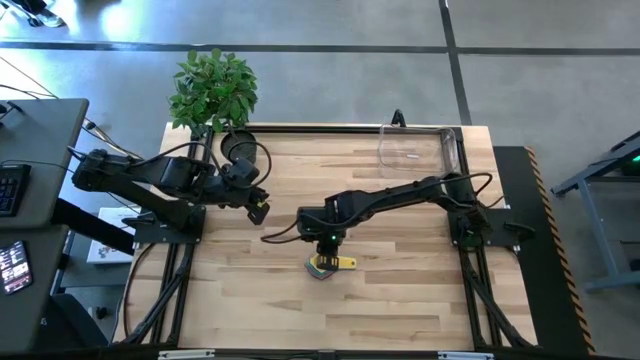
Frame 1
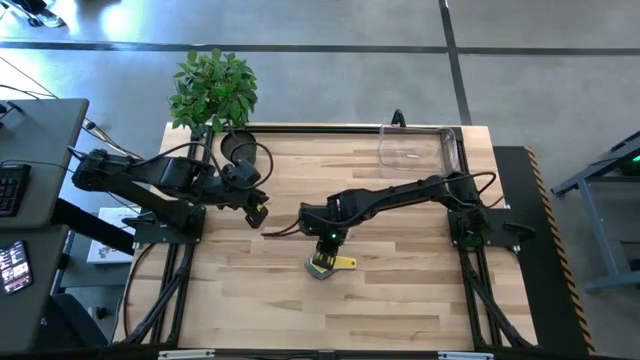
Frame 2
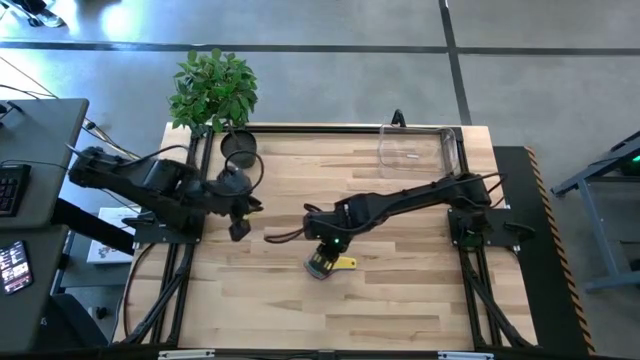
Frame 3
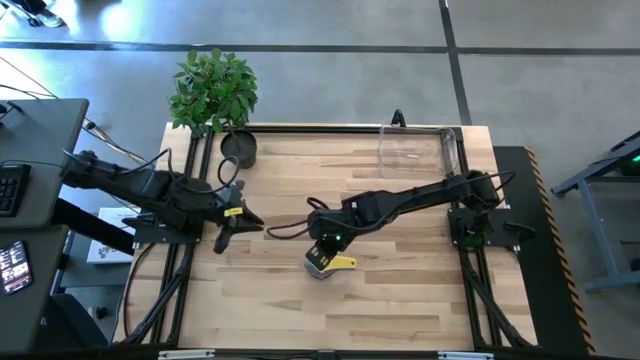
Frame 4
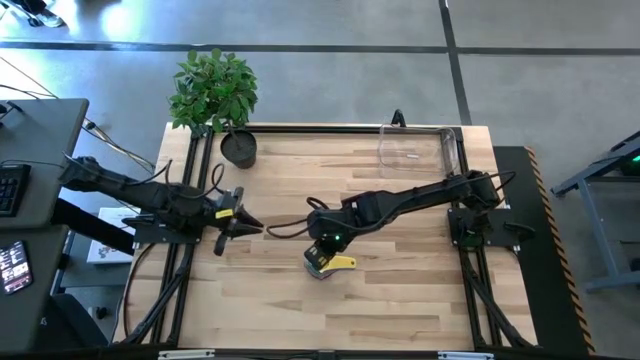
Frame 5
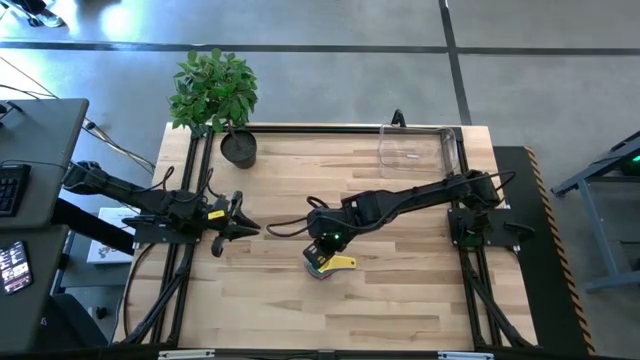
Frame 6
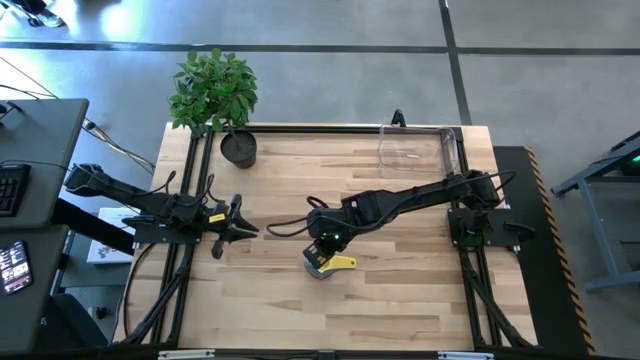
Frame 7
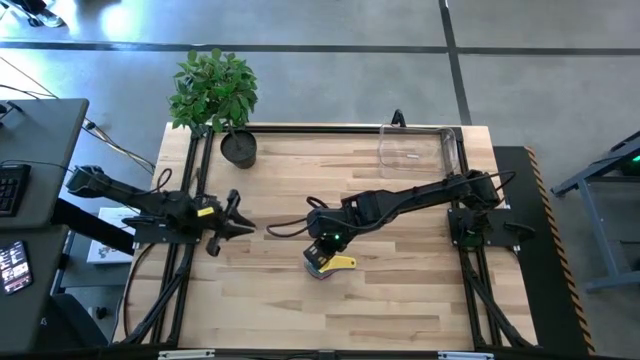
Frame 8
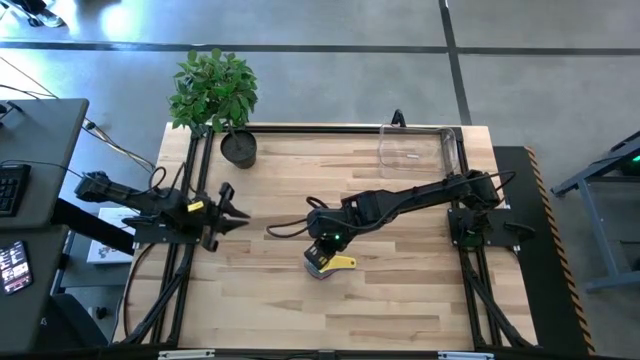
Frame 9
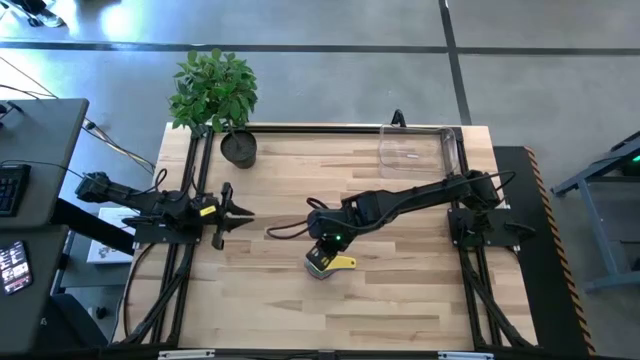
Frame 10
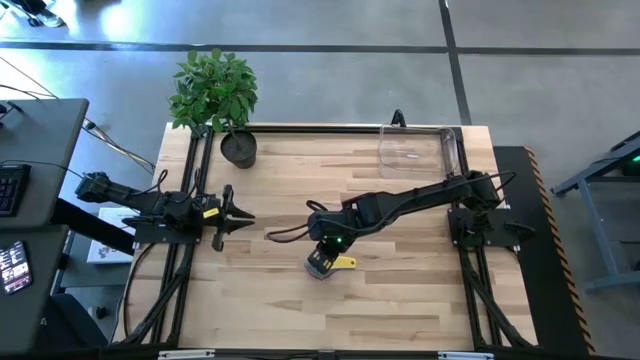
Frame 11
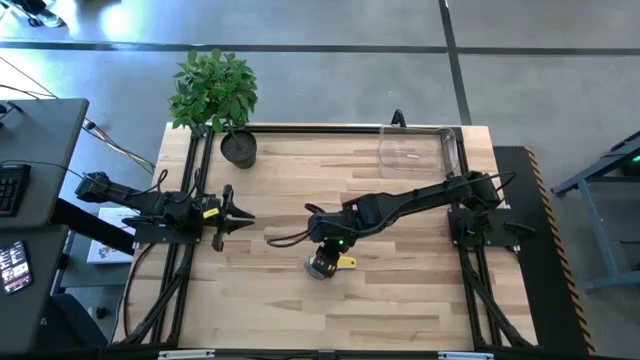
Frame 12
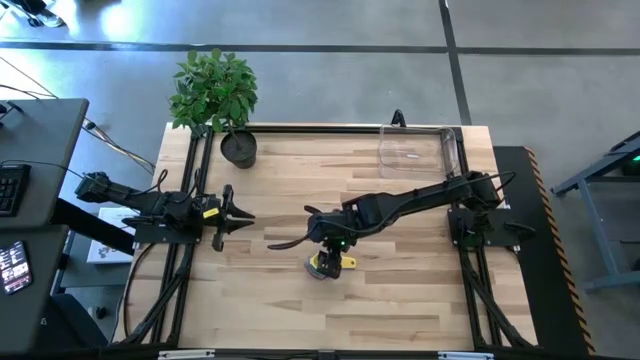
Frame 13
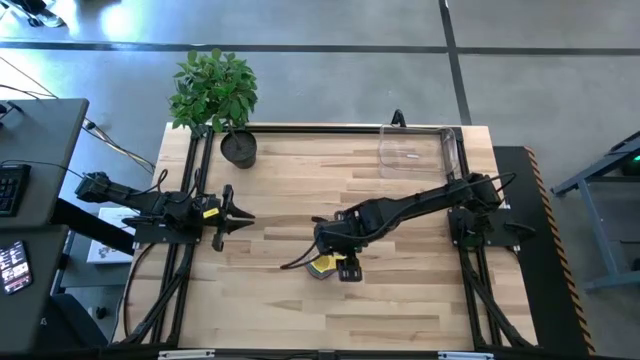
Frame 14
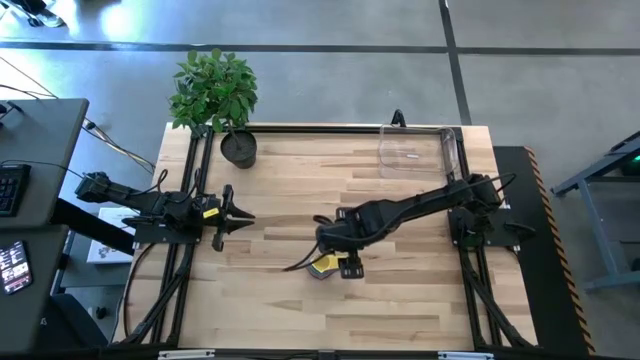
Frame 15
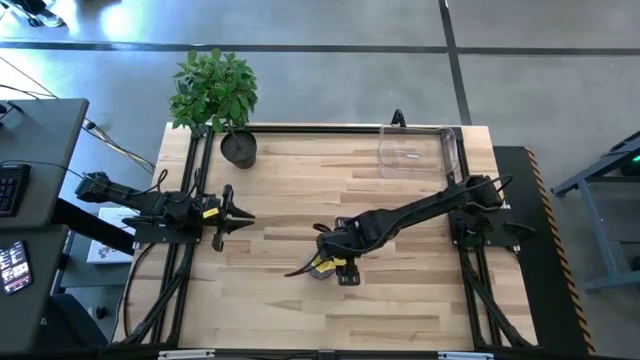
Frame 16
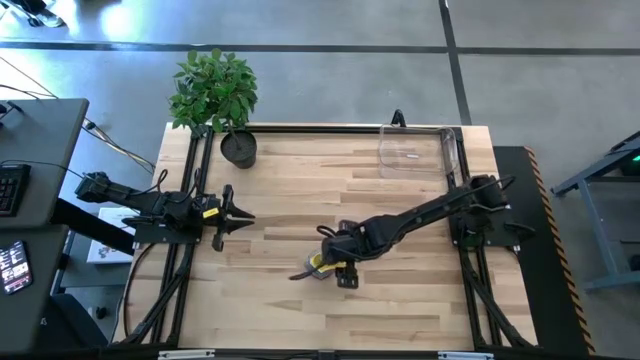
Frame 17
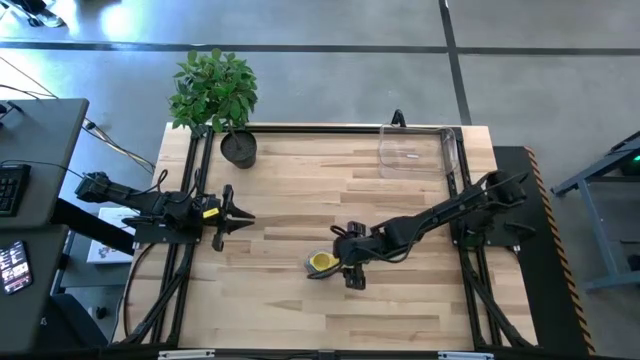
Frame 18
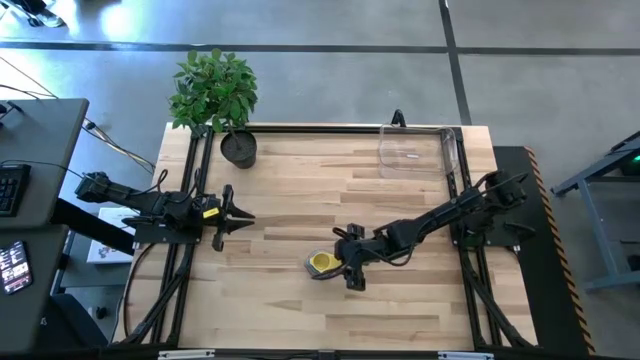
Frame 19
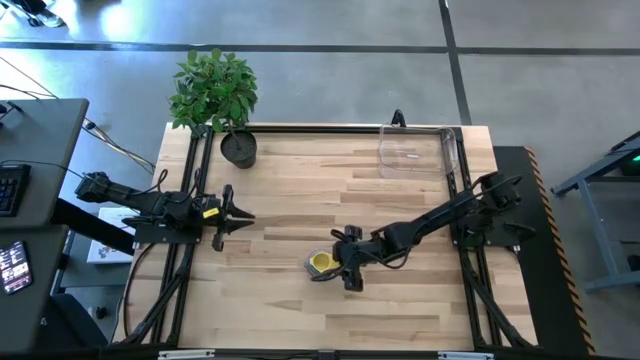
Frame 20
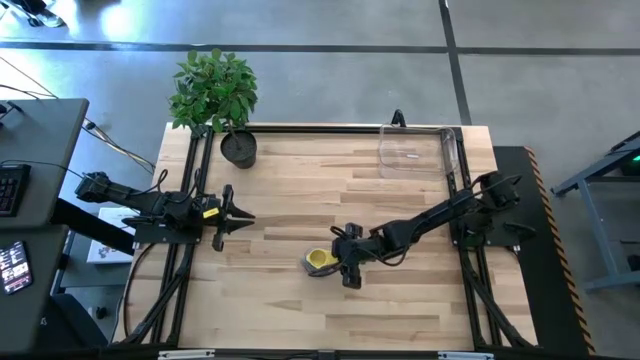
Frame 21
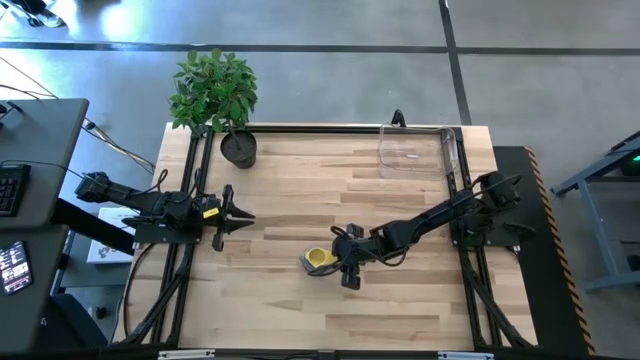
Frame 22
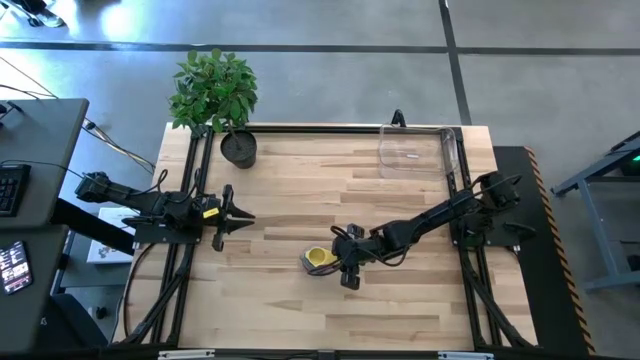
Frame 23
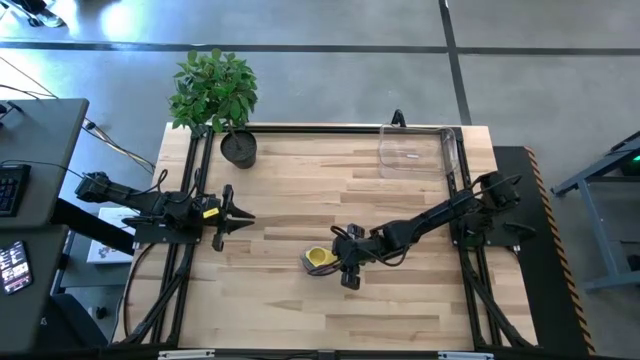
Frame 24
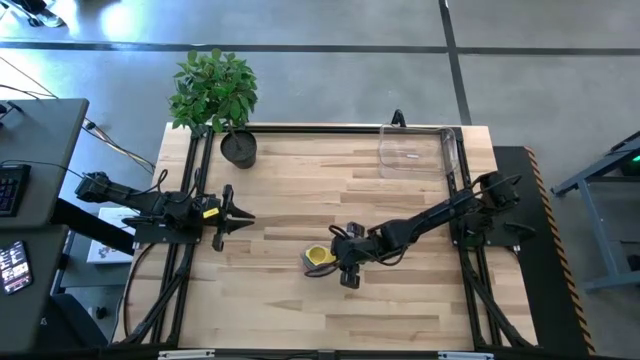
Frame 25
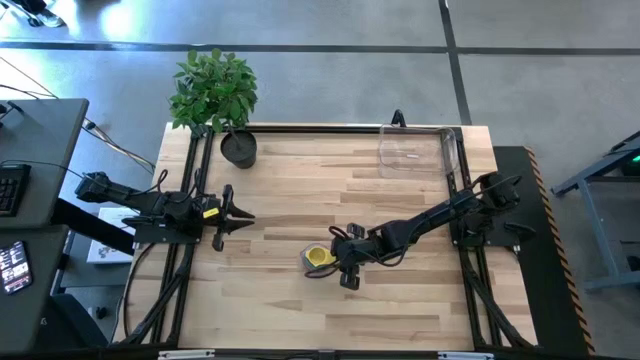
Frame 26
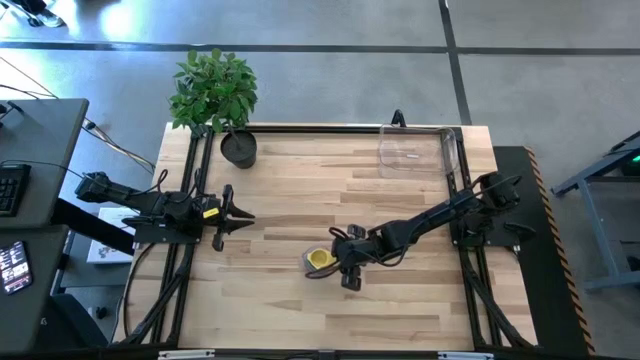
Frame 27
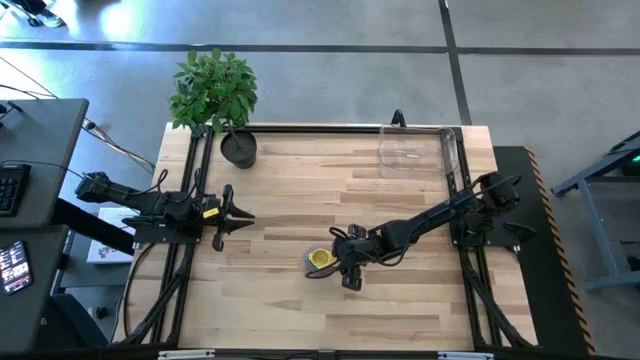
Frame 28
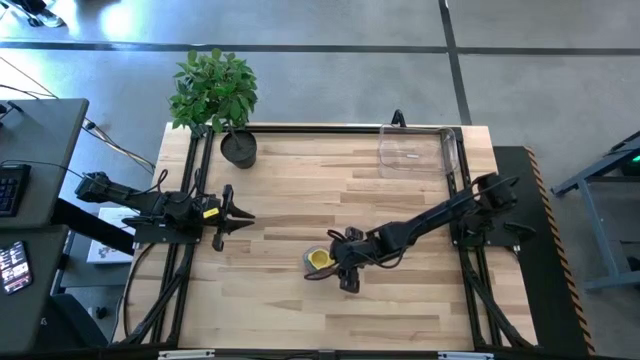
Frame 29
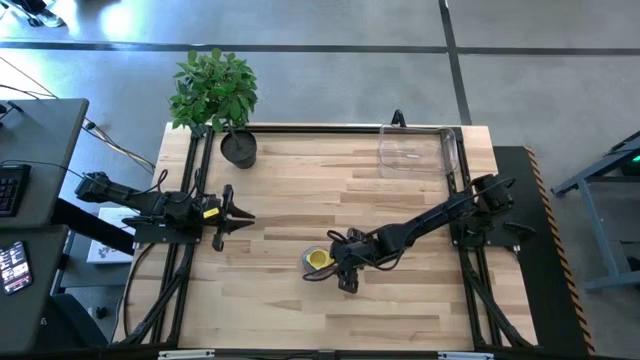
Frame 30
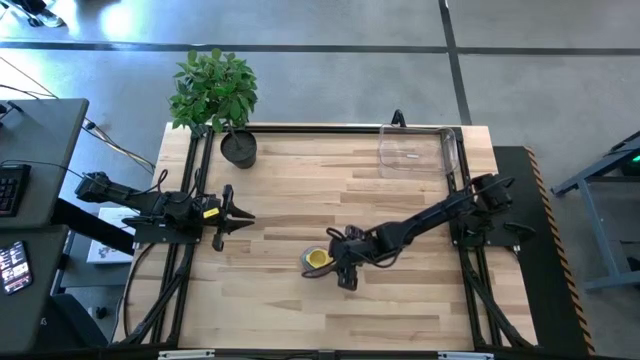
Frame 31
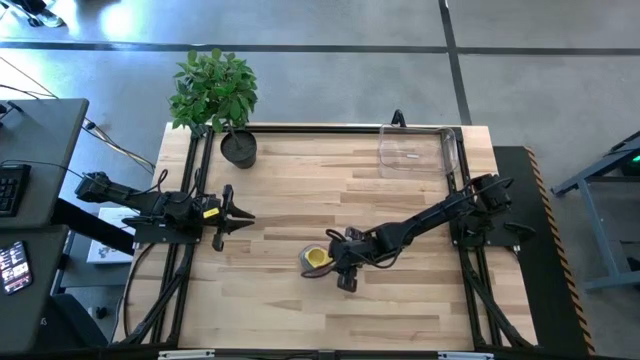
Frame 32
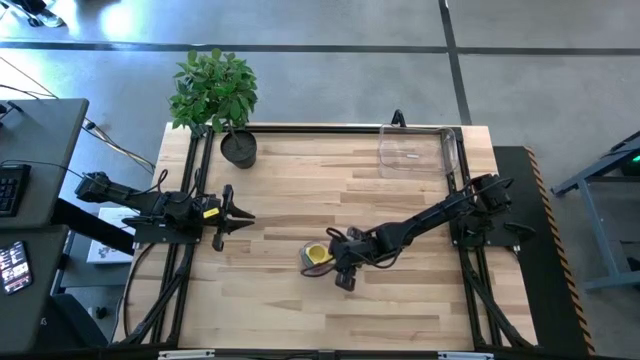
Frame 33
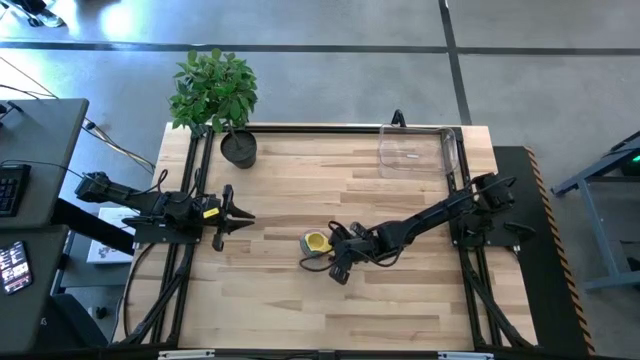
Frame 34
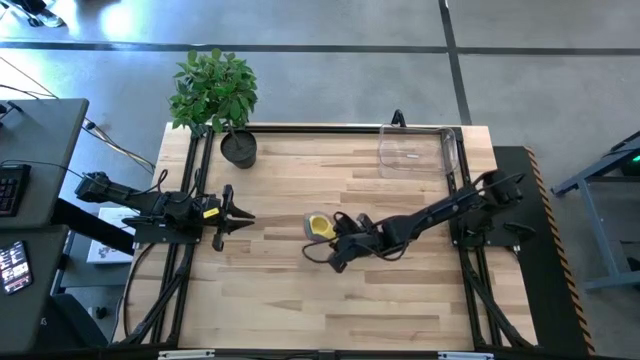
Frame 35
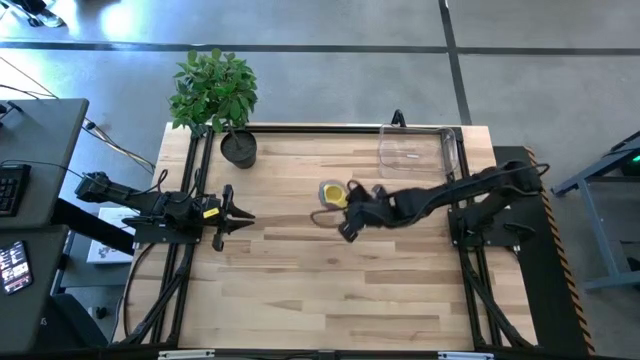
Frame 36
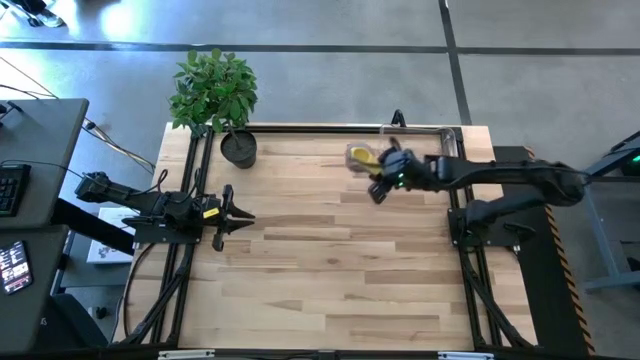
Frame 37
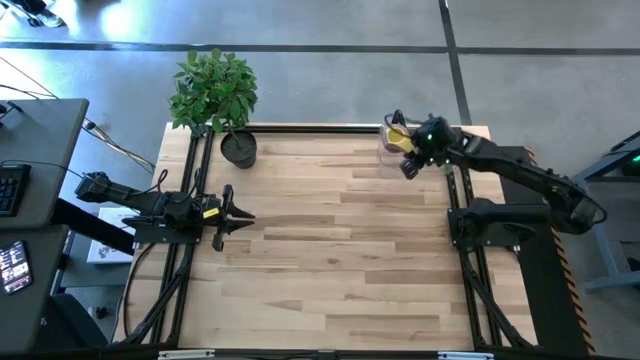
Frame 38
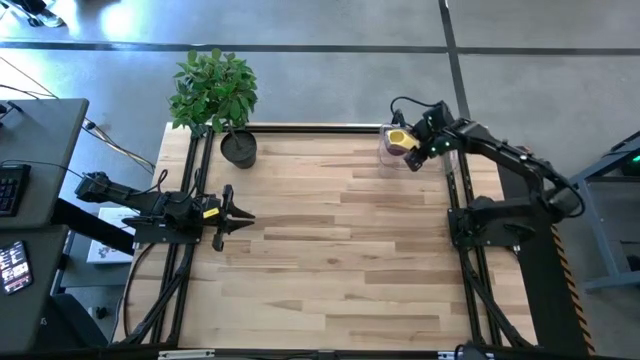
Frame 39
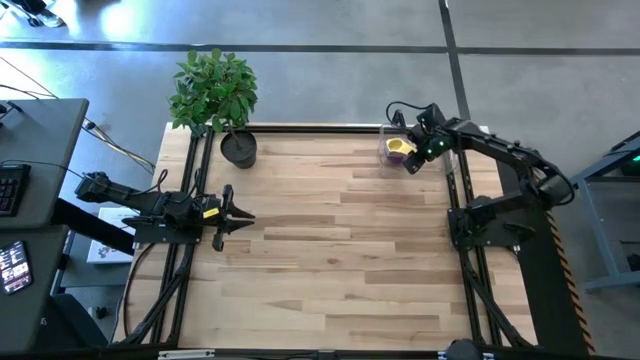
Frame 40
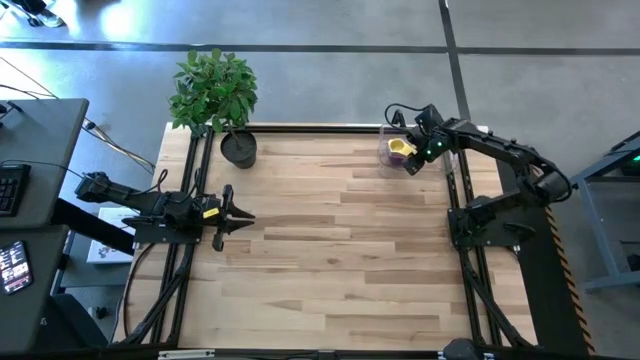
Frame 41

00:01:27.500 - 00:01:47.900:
Task: Nest measuring cups in basket
Put the nested measuring cups into the transparent bin

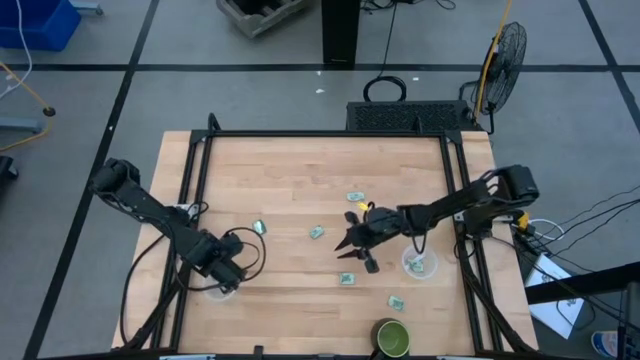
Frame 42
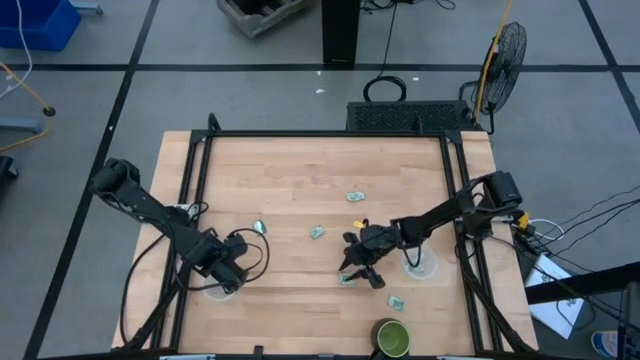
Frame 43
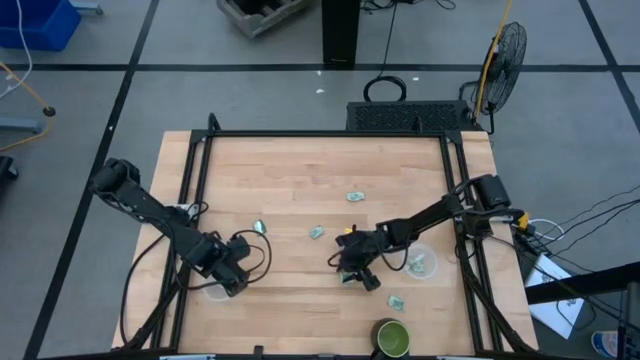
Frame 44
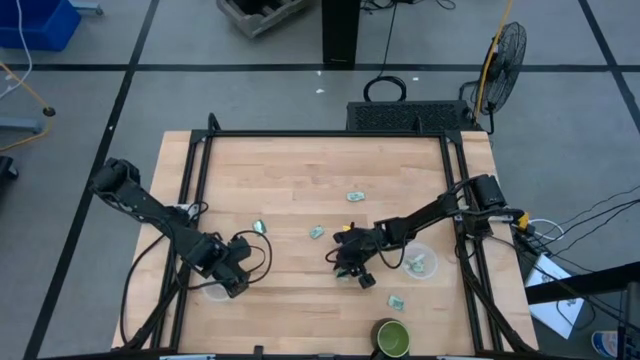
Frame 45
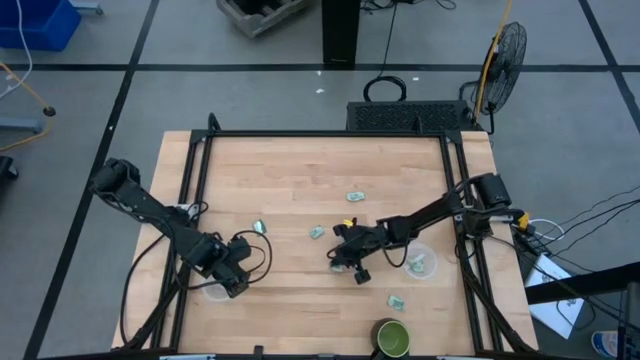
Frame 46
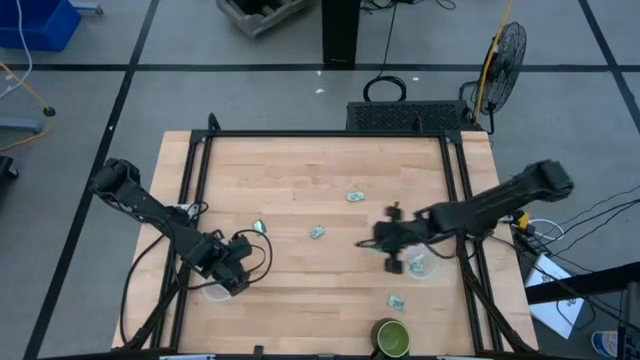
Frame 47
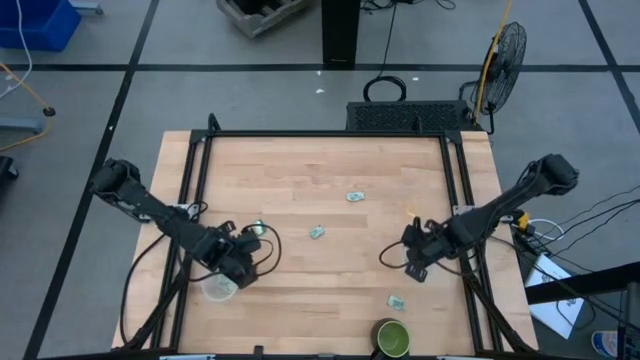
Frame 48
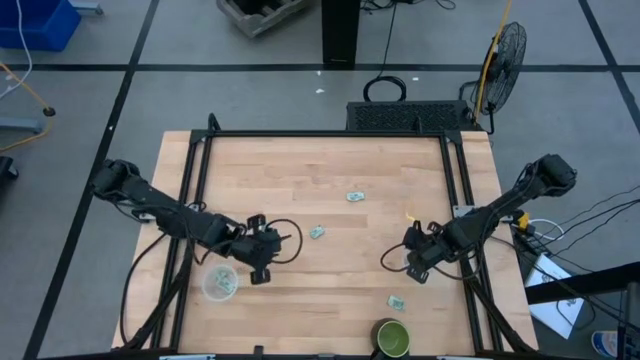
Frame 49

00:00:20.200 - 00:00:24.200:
Task: Pick and place Stevia / Truvia into bins
Put the Stevia packet into the right transparent plastic container
